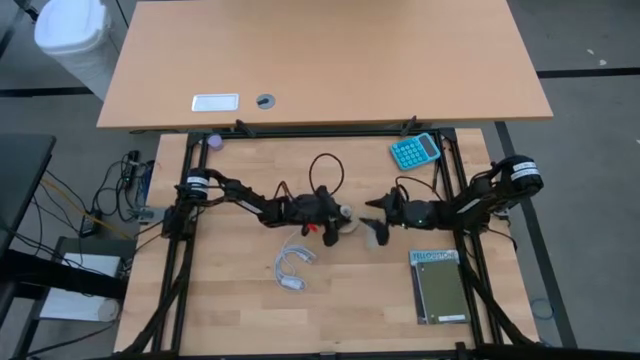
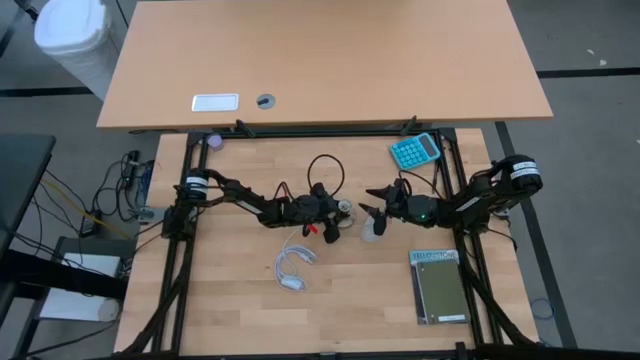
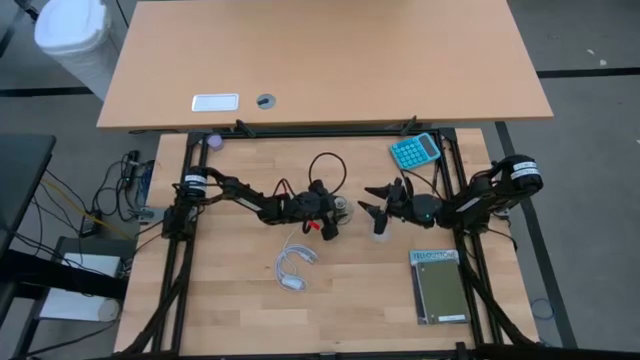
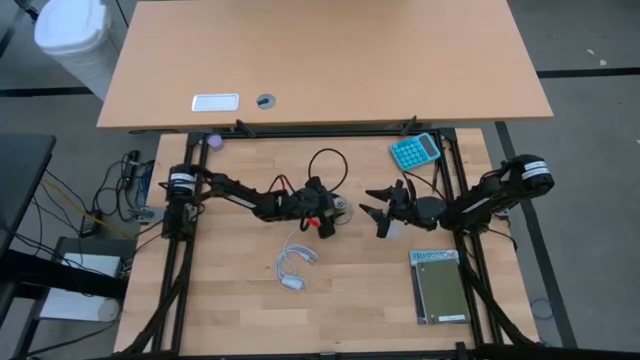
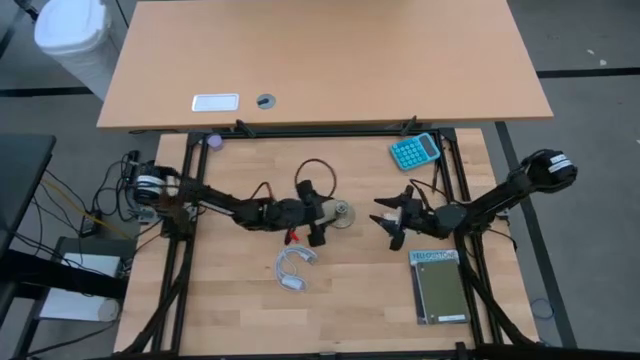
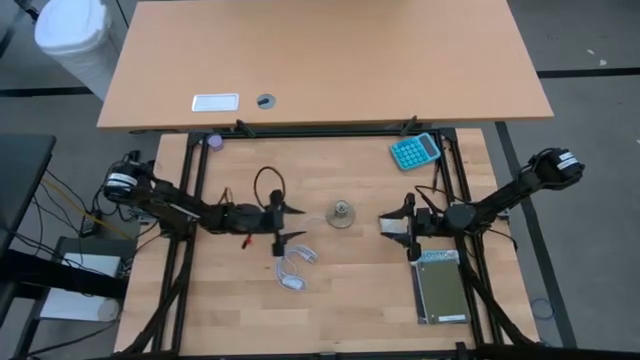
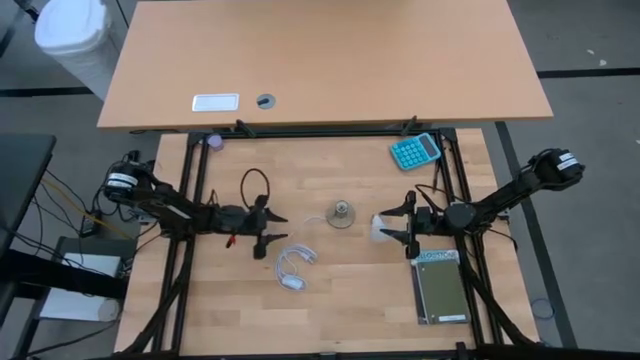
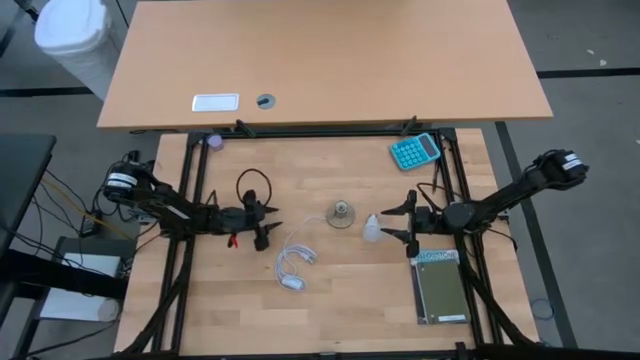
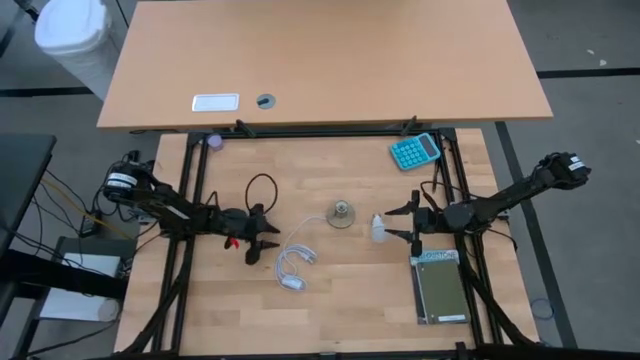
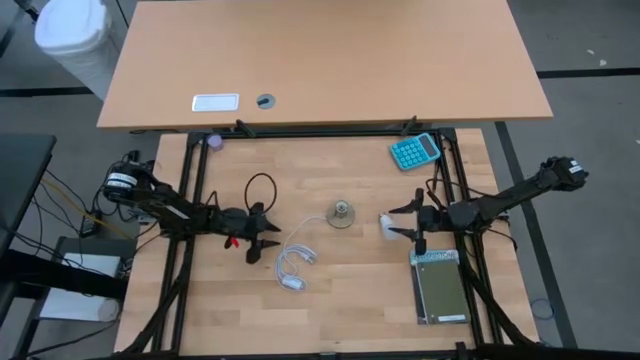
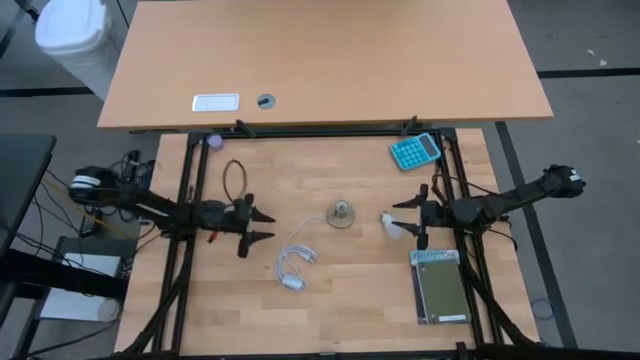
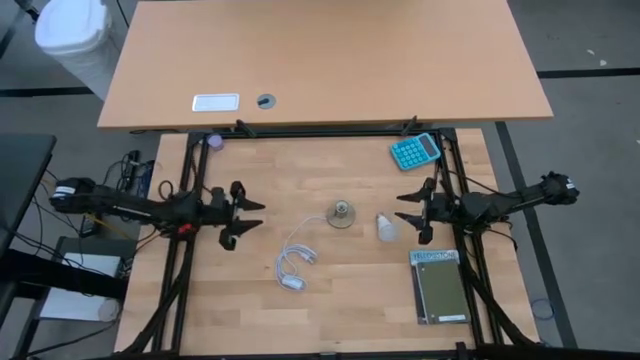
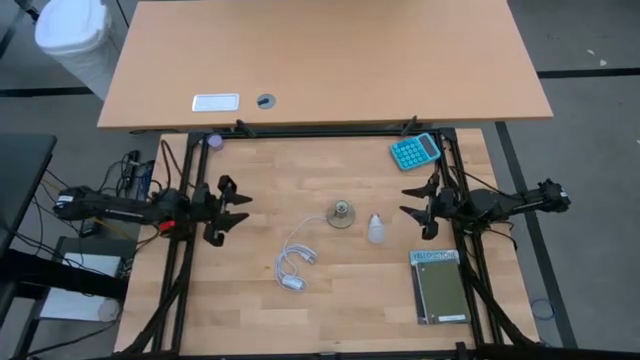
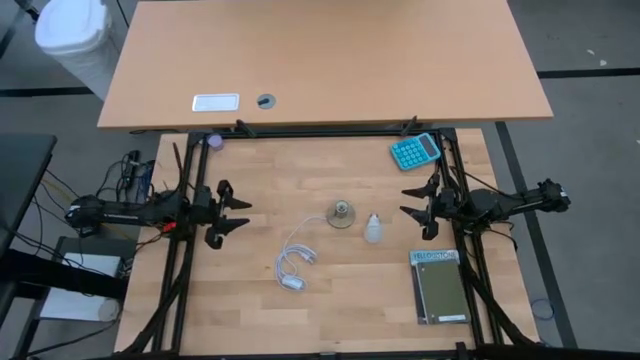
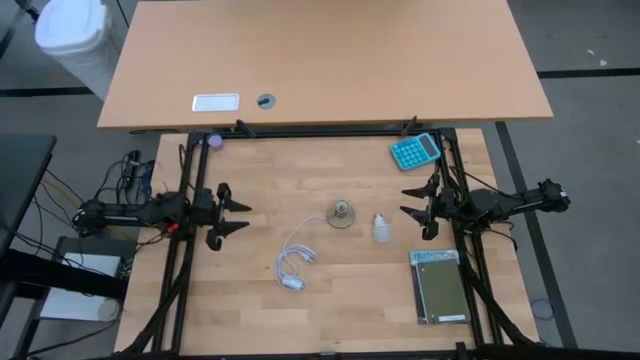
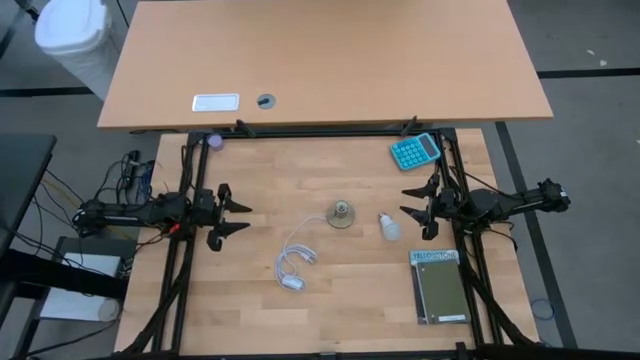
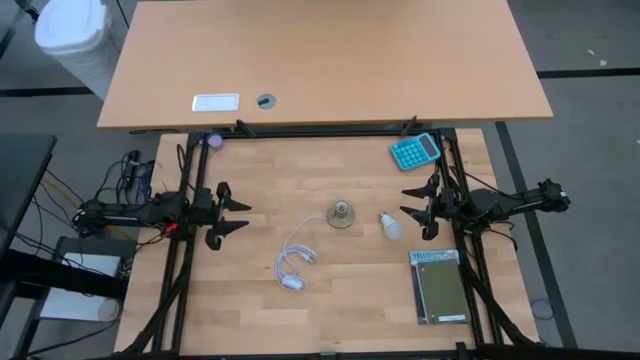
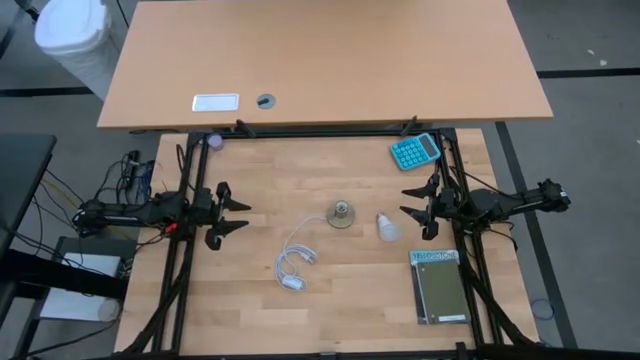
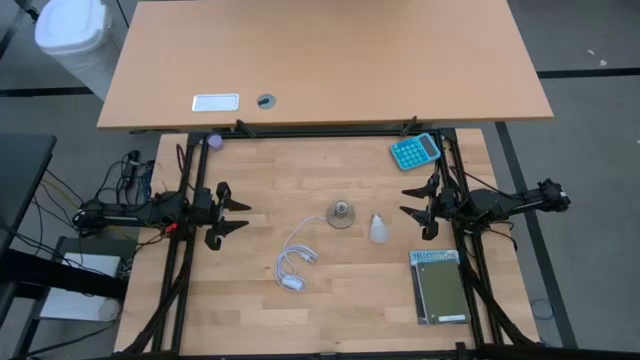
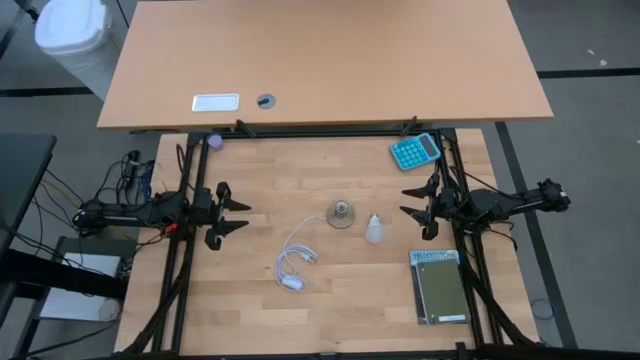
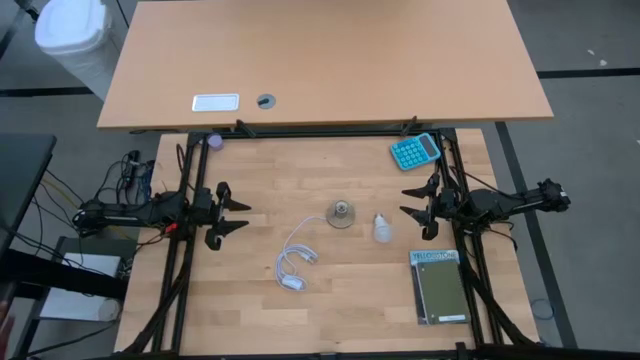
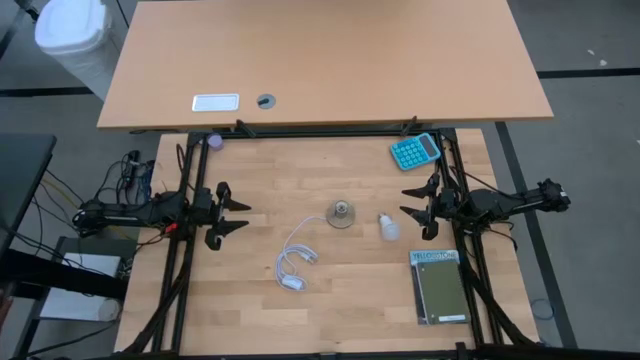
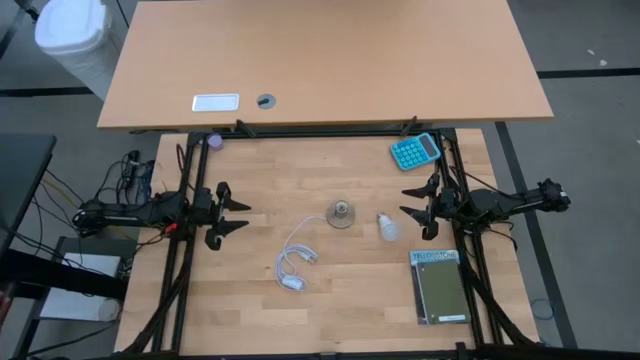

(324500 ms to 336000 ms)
Task: Screw lightbulb
Return to Home Position
